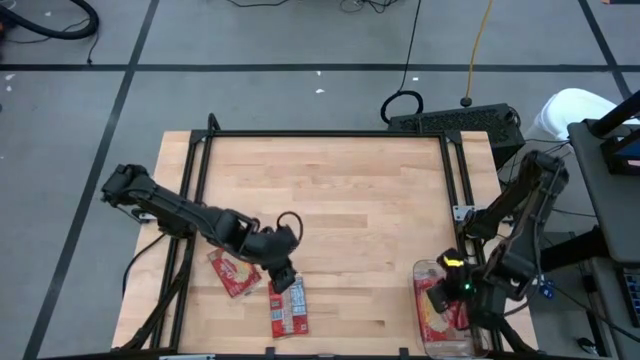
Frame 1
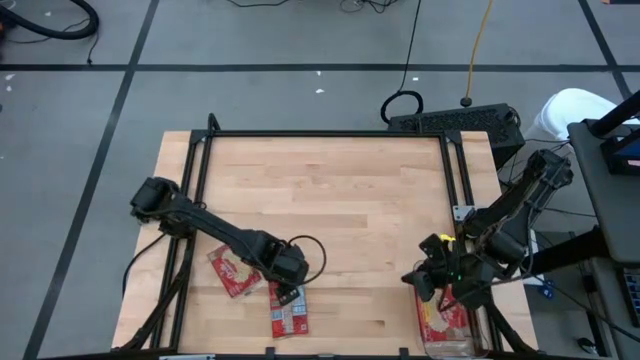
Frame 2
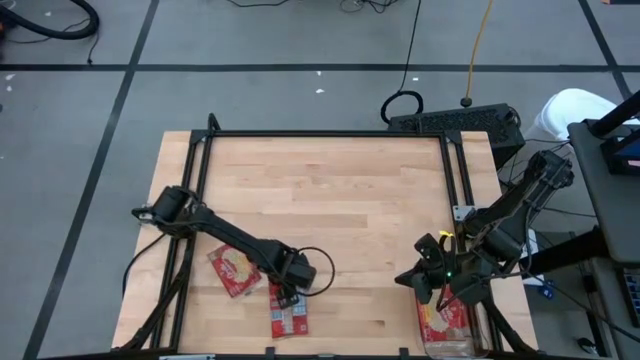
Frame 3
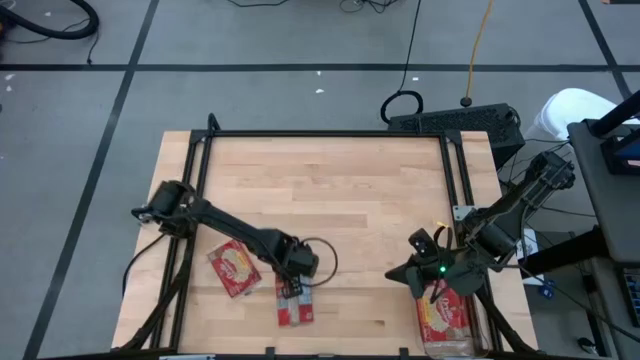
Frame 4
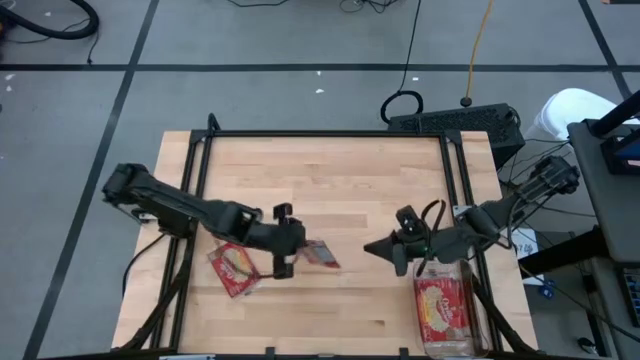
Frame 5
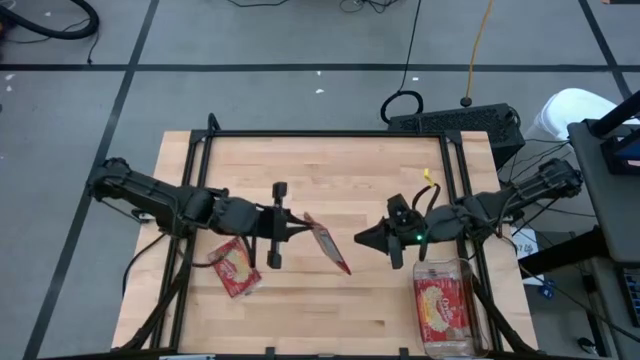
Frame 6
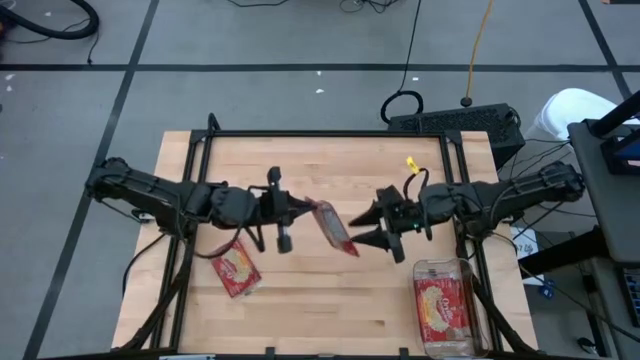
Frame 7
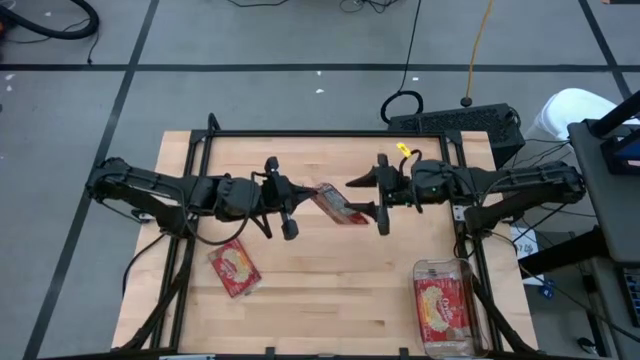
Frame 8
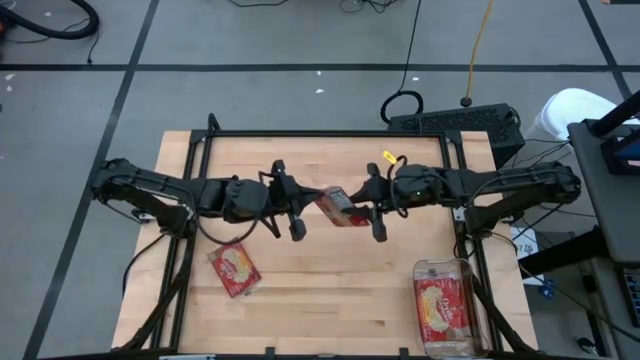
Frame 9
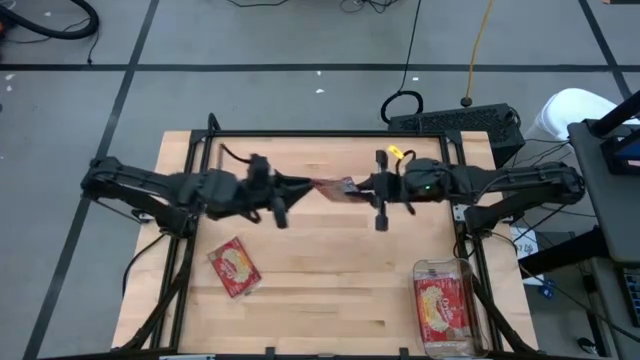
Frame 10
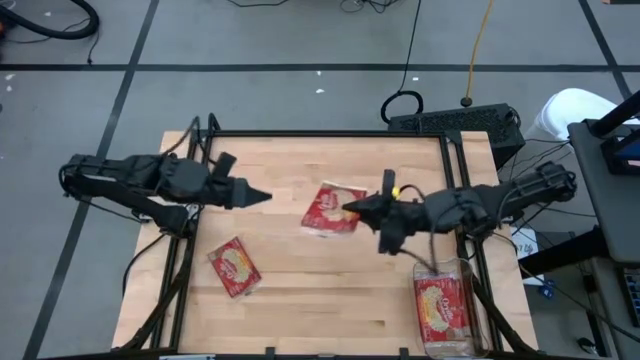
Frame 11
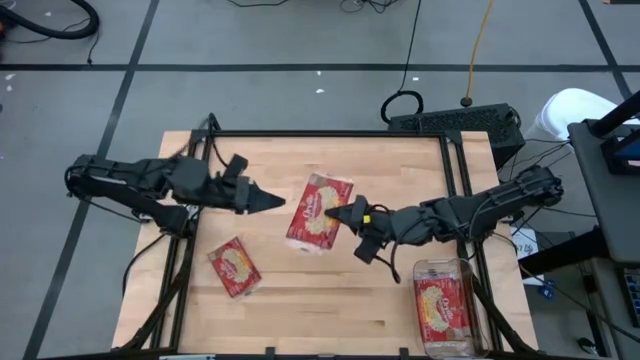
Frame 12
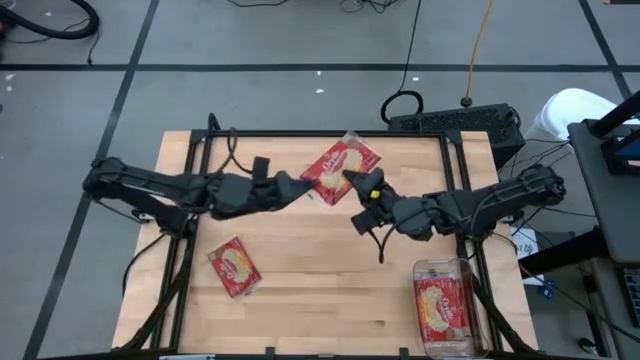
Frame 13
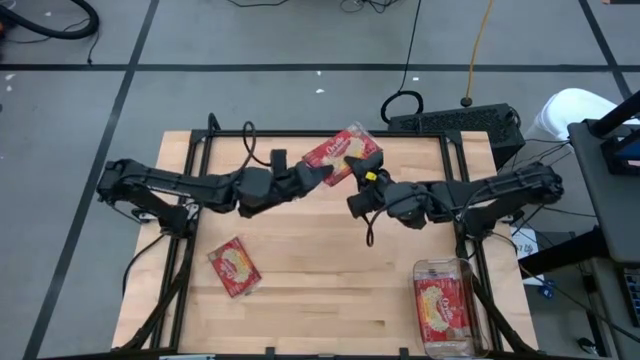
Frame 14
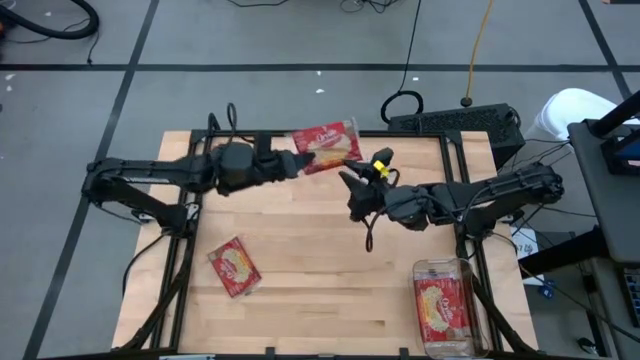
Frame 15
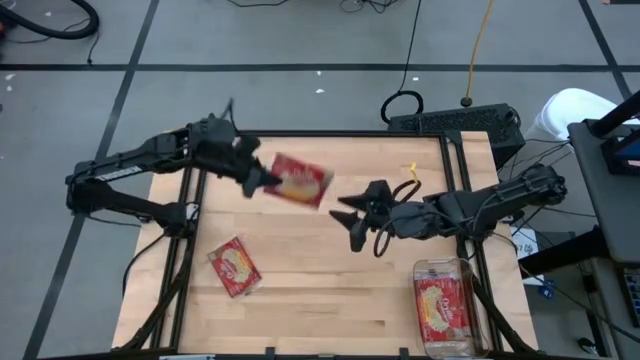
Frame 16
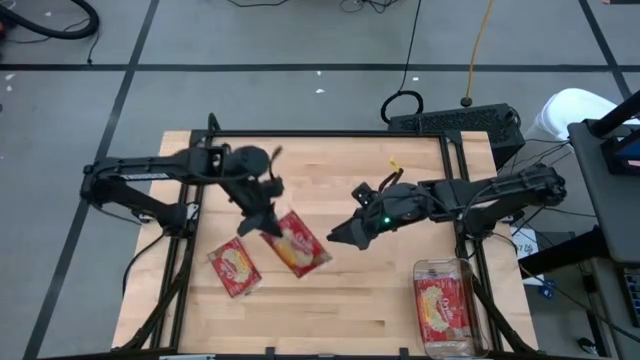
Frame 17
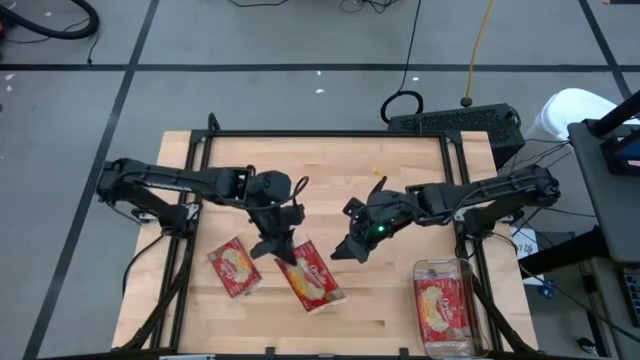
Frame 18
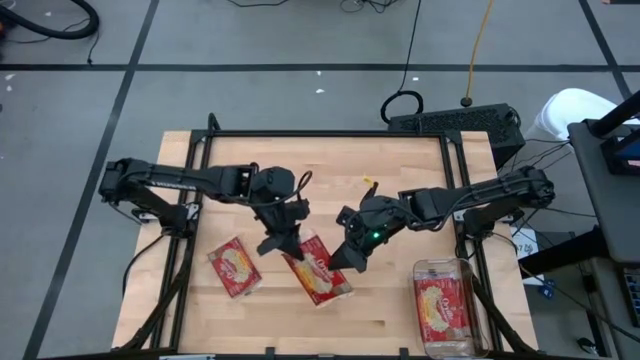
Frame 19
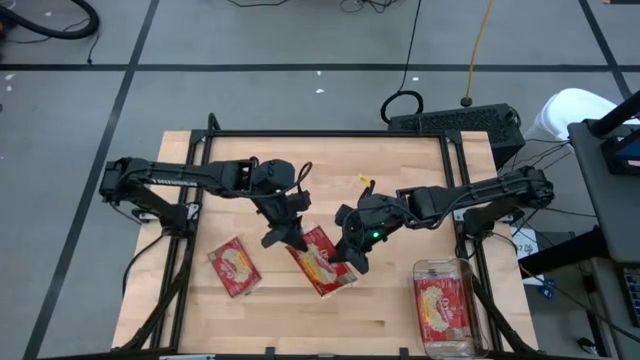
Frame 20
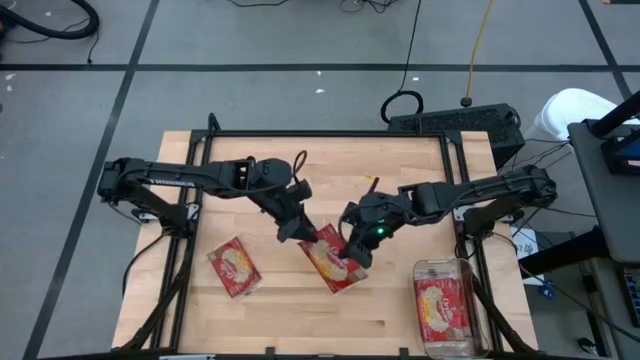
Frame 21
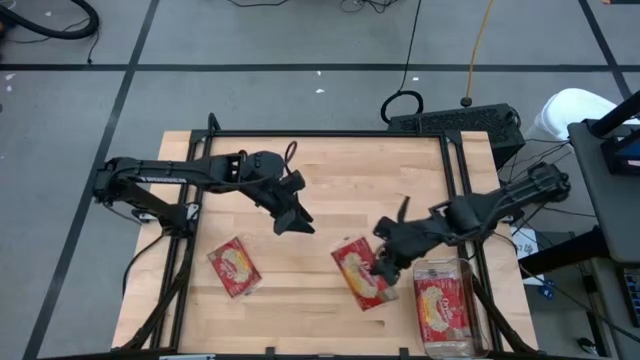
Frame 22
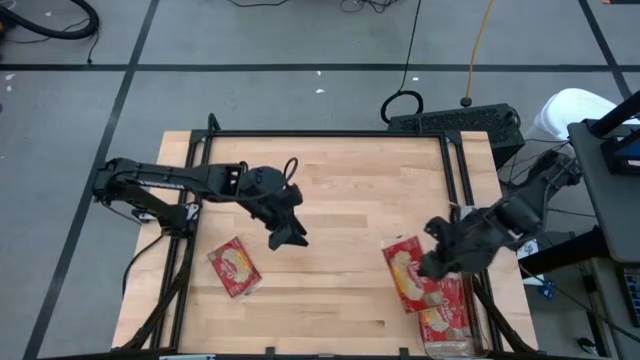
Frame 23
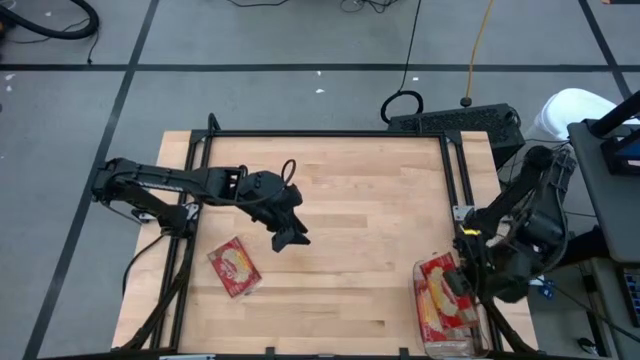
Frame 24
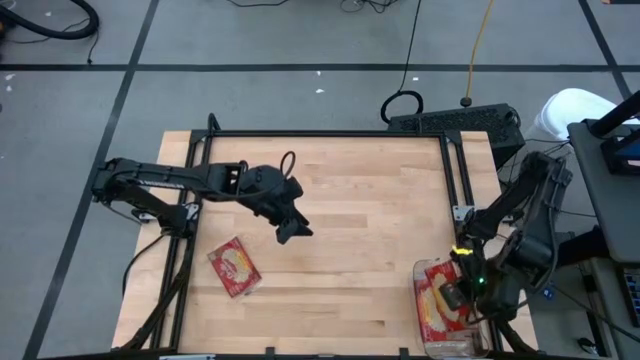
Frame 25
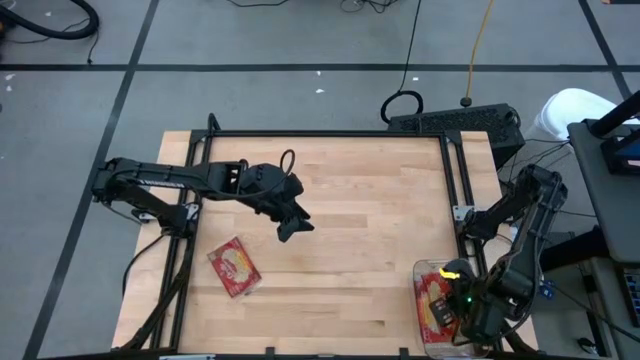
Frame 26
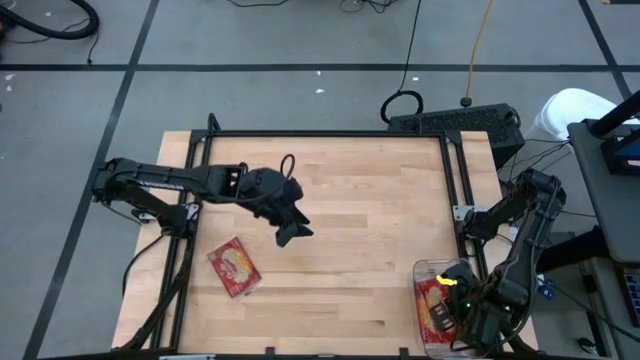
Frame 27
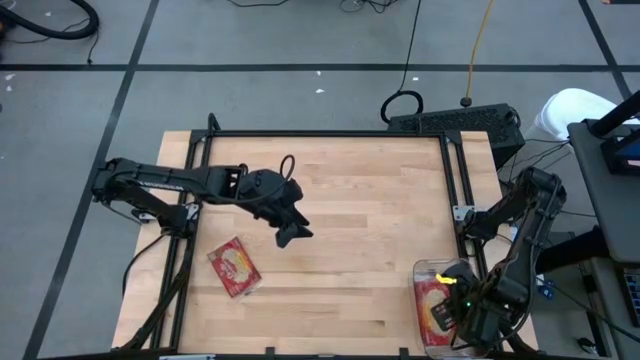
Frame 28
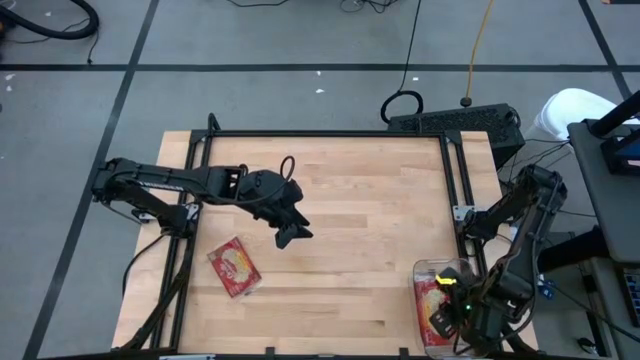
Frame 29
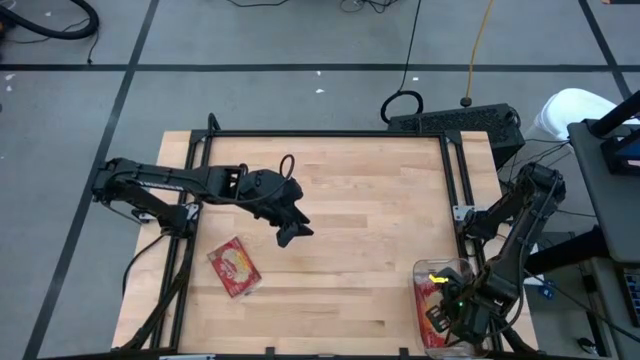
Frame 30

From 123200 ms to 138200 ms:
Task: Sort popcorn bags into baskets
Put the popcorn bag into the transparent bin

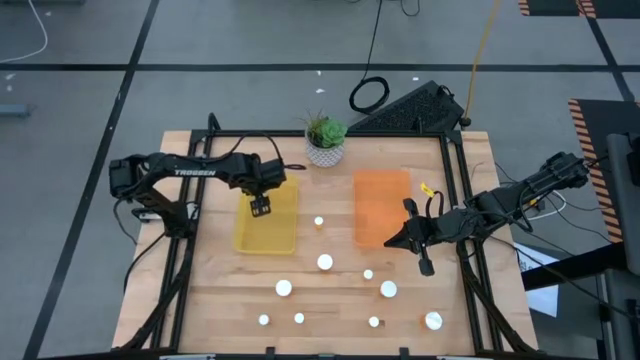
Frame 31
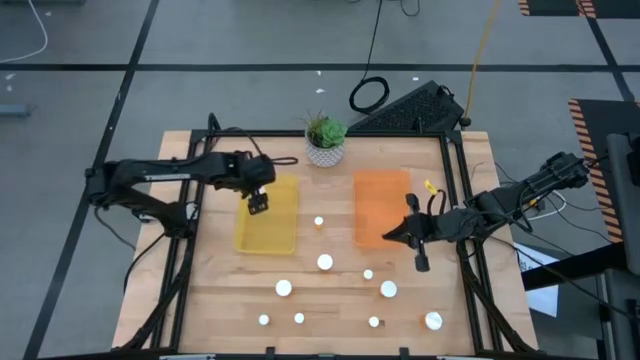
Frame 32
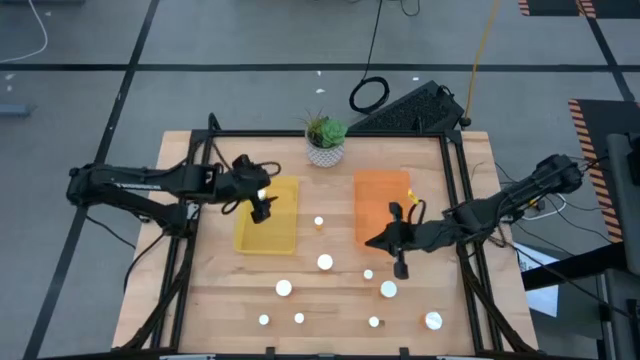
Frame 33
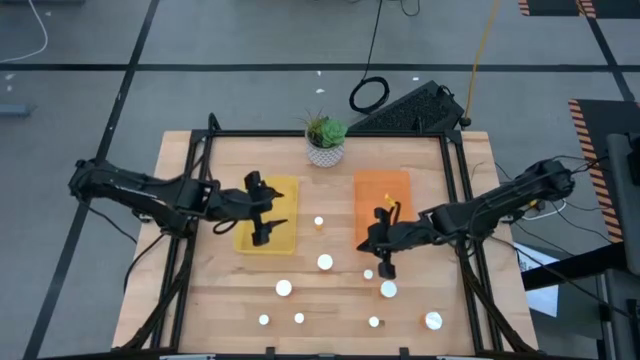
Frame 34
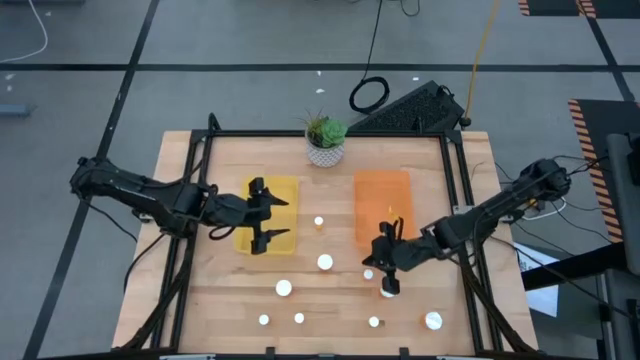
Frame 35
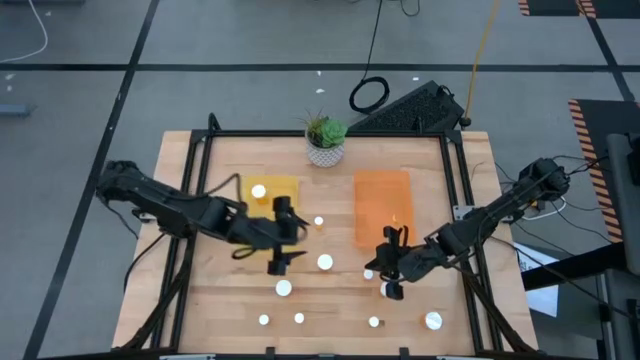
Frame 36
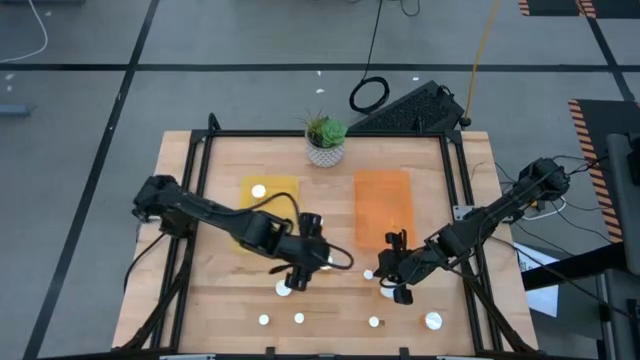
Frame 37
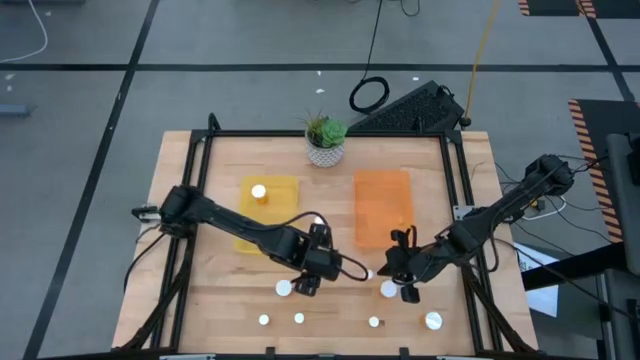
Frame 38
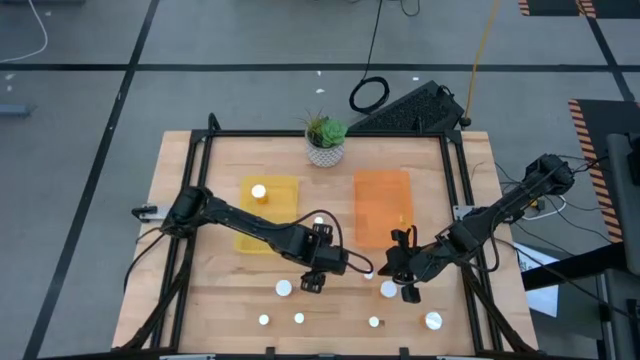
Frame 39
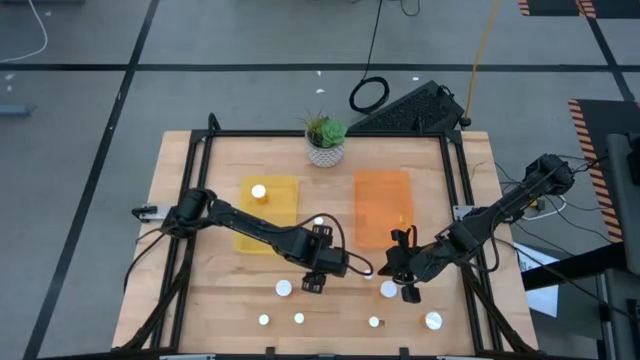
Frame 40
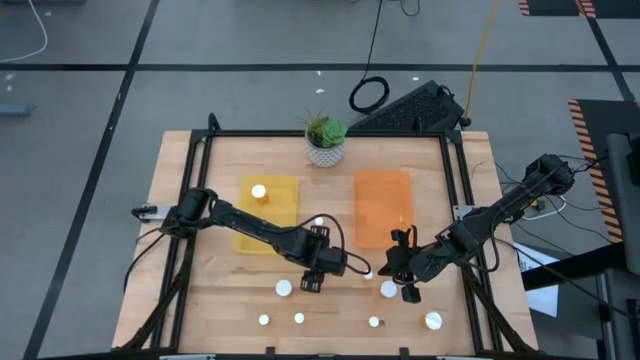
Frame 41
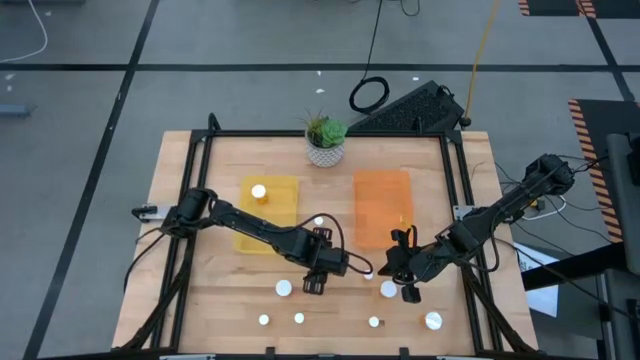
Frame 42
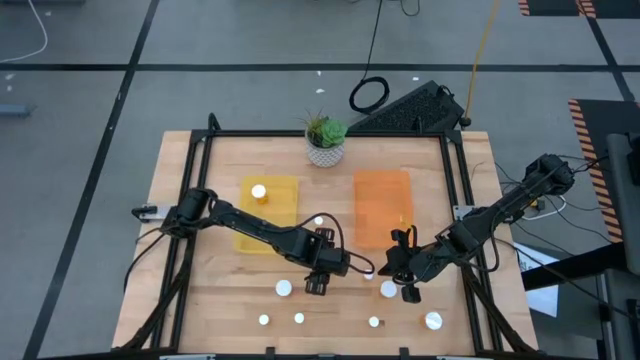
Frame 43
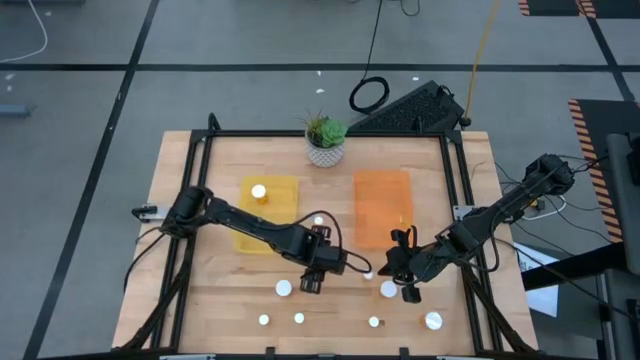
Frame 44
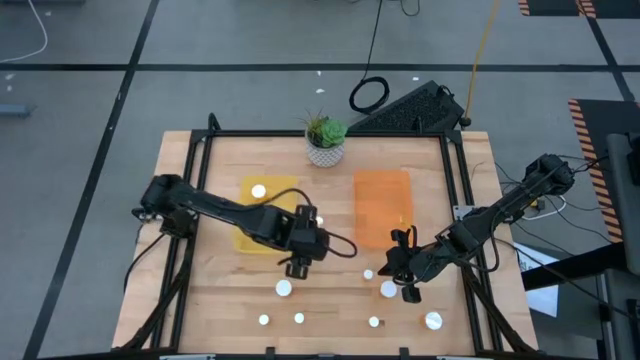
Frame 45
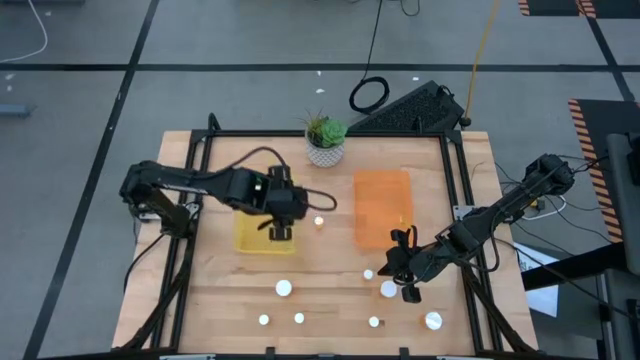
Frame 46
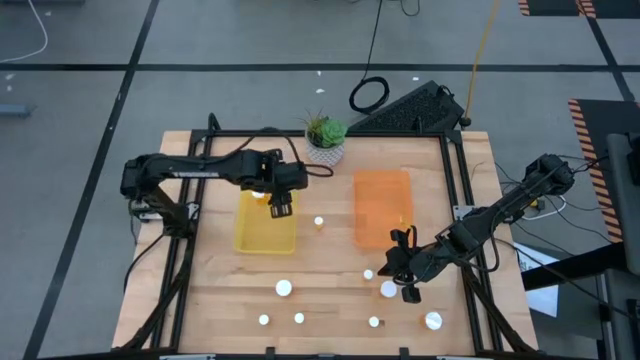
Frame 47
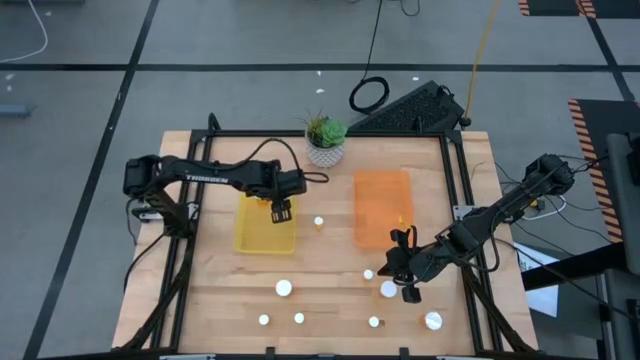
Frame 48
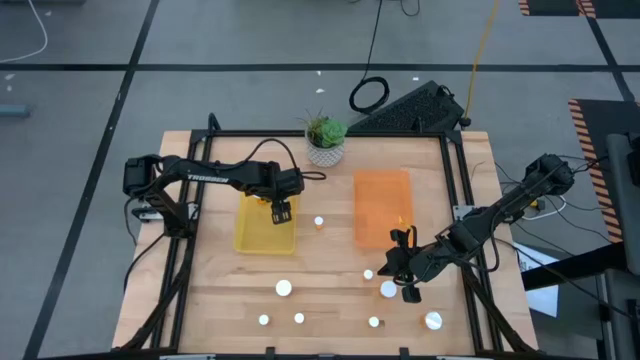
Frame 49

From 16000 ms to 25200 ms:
Task: Pick and place medicine bottles into bin by pill shape (circle, oval)
Put the large medicine bottle into the yellow bin
